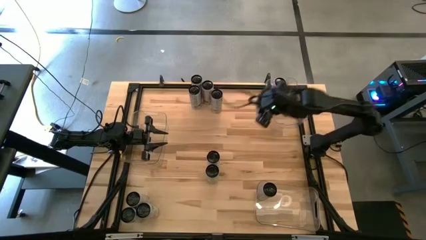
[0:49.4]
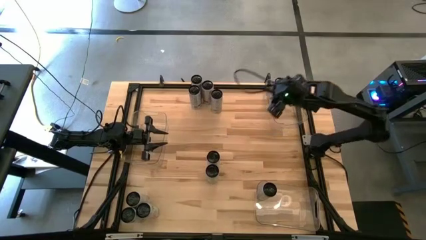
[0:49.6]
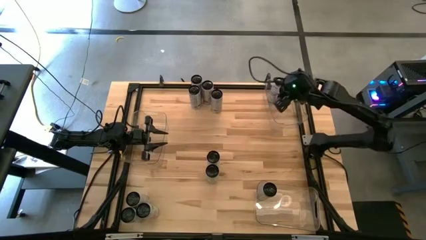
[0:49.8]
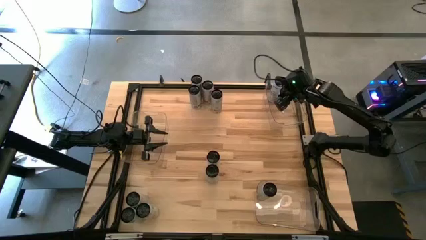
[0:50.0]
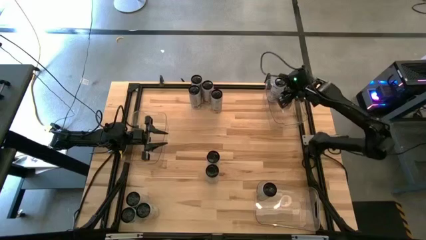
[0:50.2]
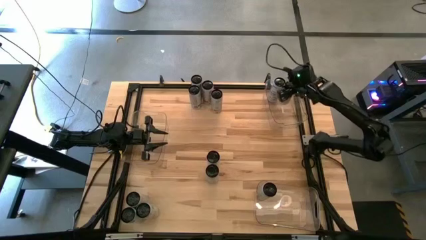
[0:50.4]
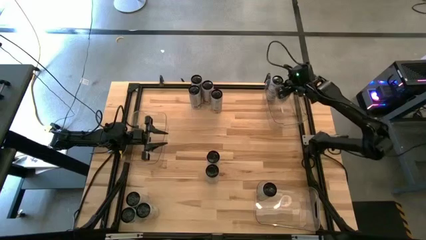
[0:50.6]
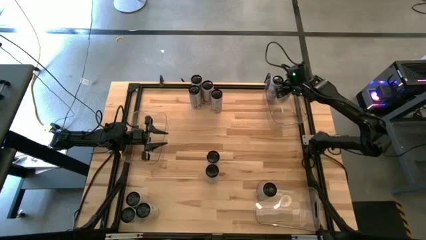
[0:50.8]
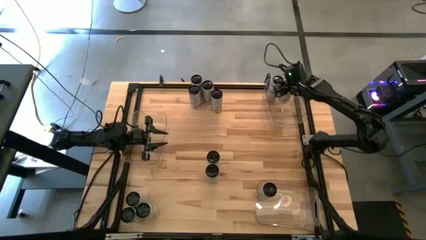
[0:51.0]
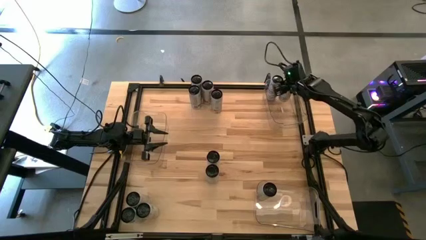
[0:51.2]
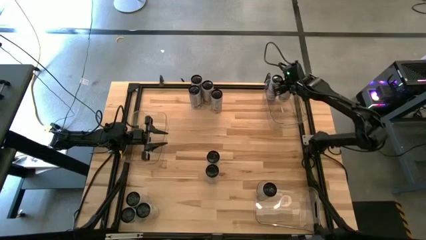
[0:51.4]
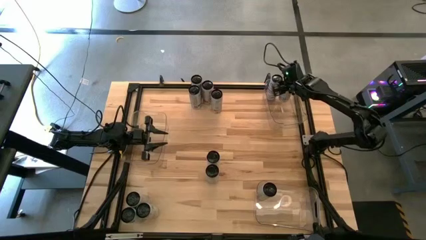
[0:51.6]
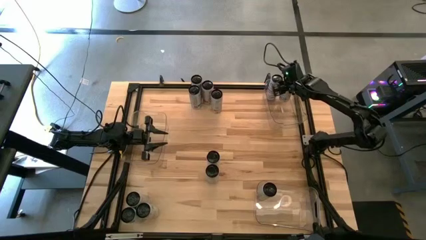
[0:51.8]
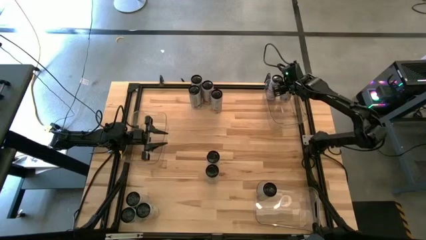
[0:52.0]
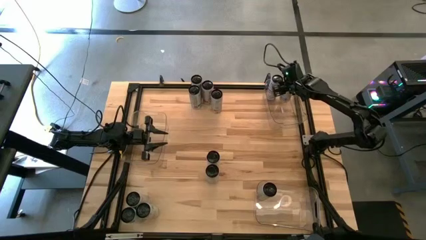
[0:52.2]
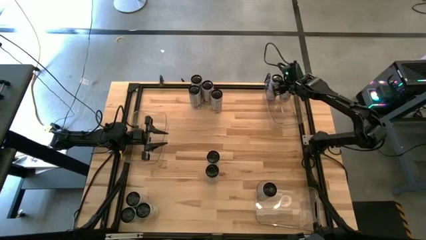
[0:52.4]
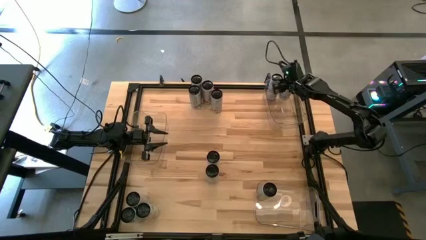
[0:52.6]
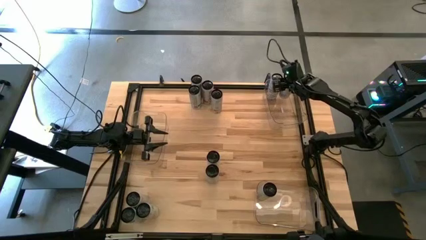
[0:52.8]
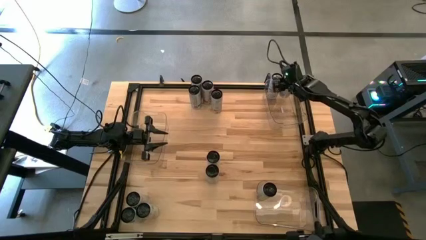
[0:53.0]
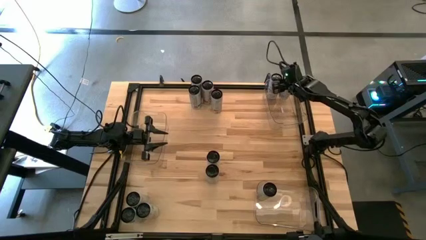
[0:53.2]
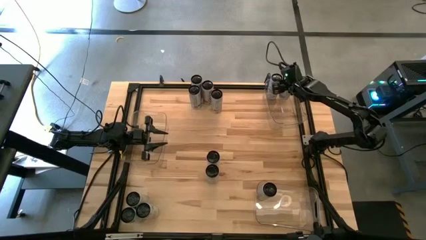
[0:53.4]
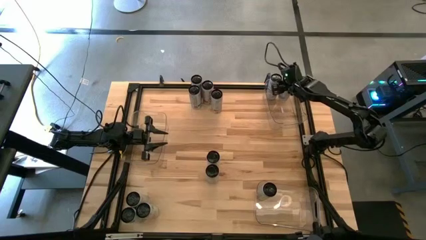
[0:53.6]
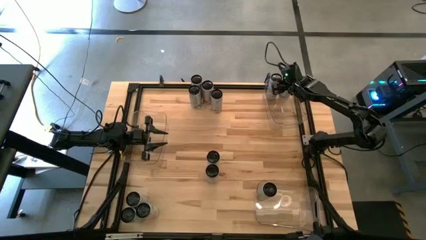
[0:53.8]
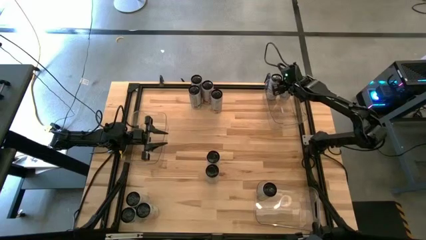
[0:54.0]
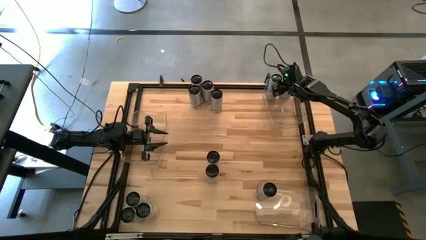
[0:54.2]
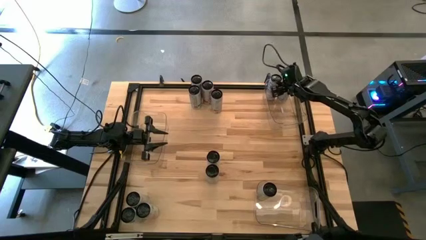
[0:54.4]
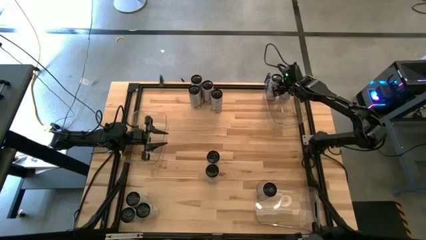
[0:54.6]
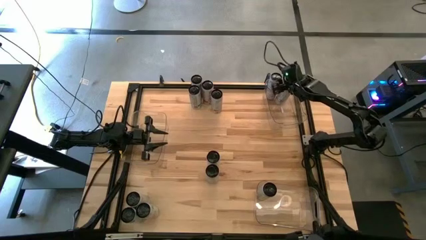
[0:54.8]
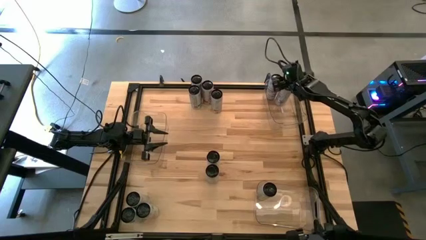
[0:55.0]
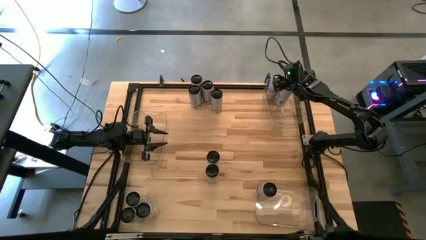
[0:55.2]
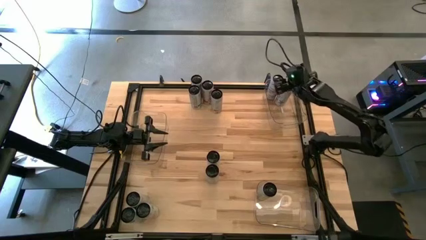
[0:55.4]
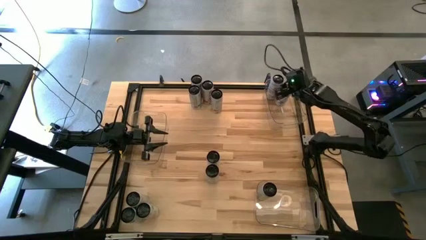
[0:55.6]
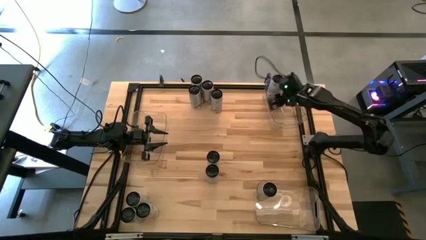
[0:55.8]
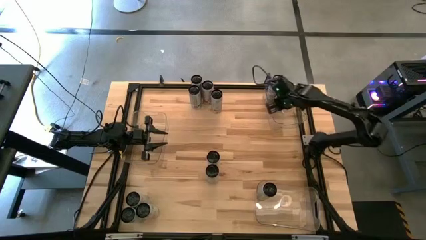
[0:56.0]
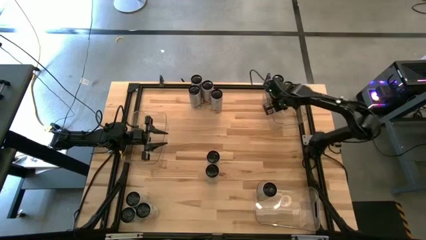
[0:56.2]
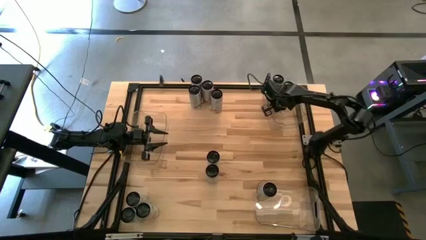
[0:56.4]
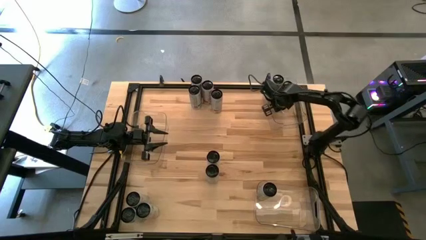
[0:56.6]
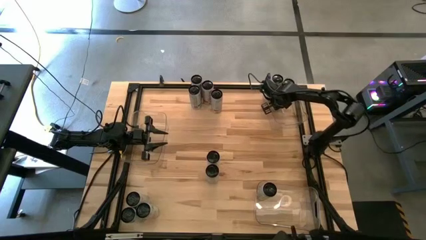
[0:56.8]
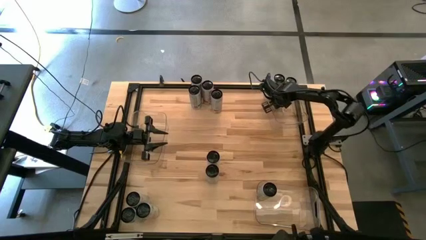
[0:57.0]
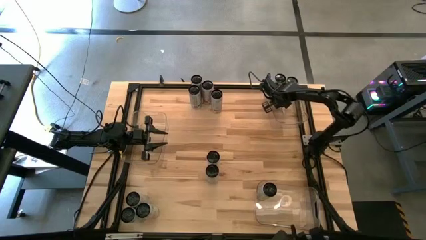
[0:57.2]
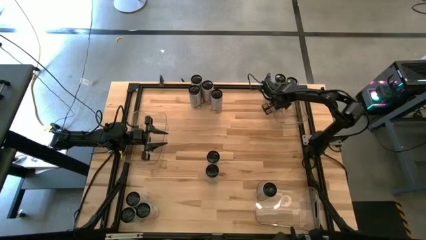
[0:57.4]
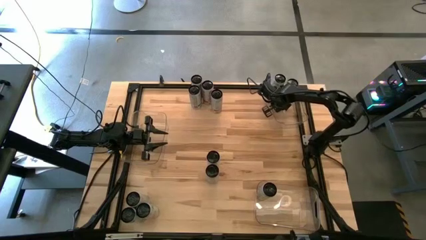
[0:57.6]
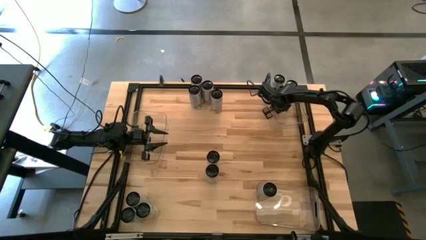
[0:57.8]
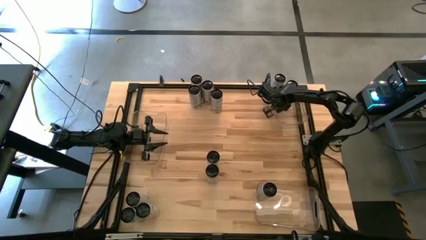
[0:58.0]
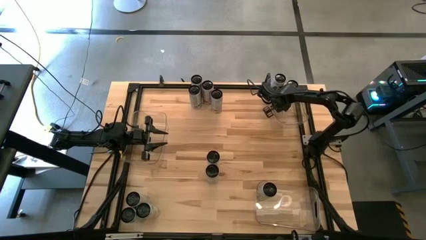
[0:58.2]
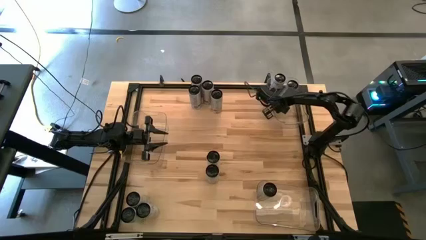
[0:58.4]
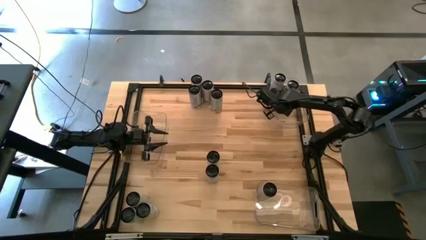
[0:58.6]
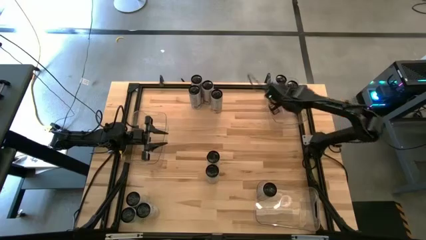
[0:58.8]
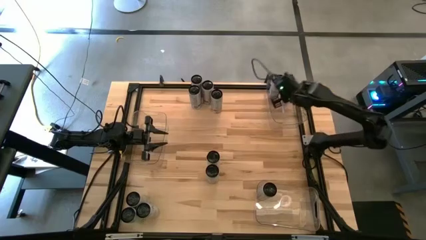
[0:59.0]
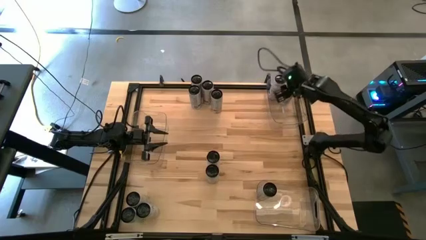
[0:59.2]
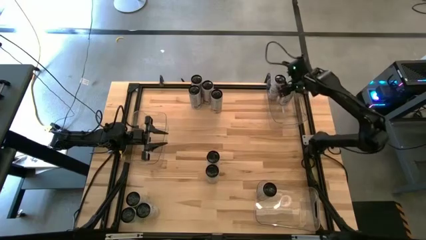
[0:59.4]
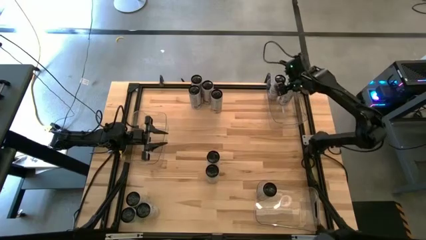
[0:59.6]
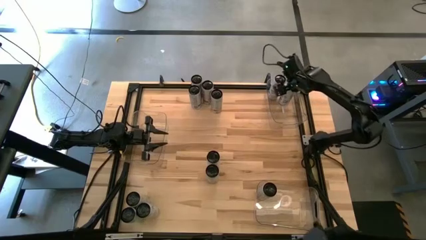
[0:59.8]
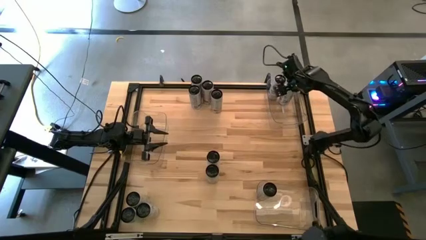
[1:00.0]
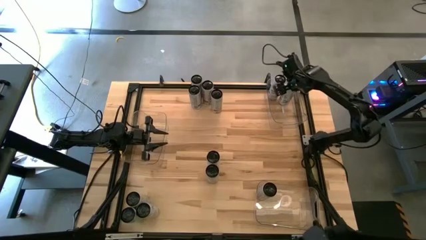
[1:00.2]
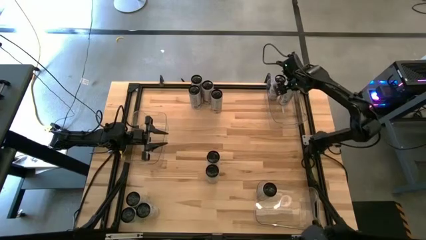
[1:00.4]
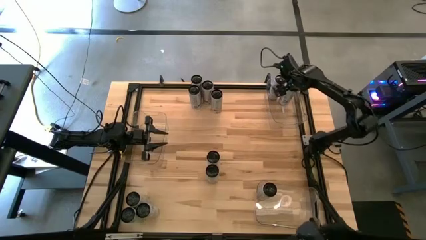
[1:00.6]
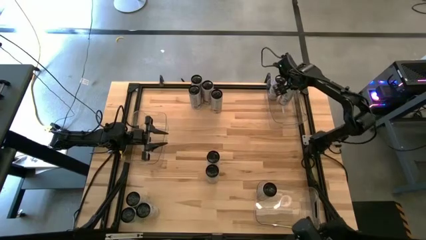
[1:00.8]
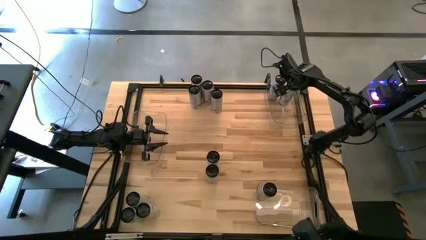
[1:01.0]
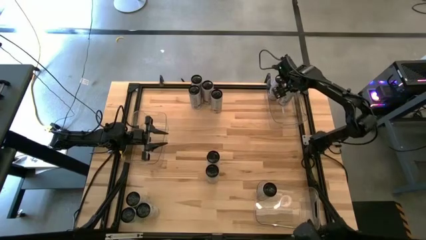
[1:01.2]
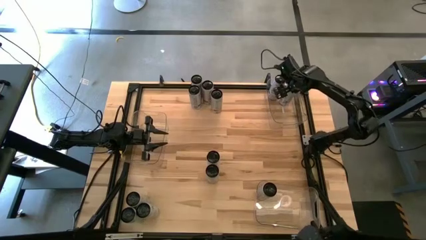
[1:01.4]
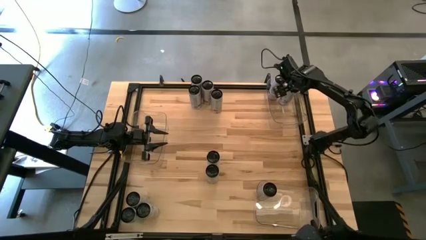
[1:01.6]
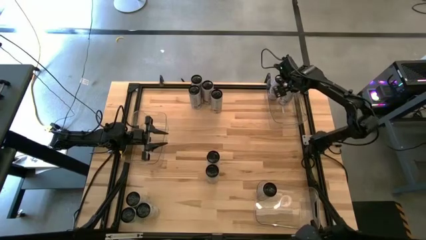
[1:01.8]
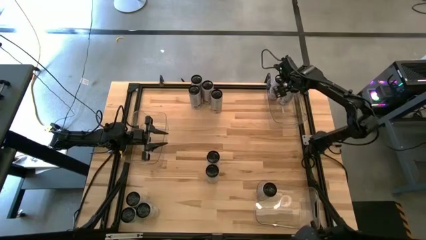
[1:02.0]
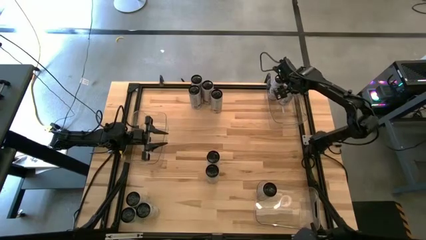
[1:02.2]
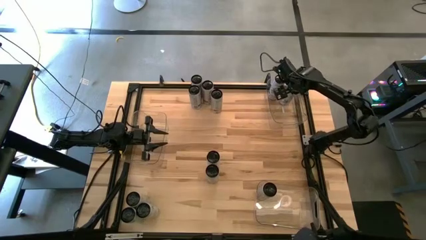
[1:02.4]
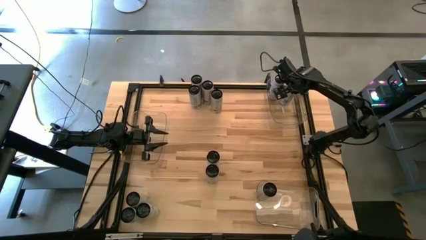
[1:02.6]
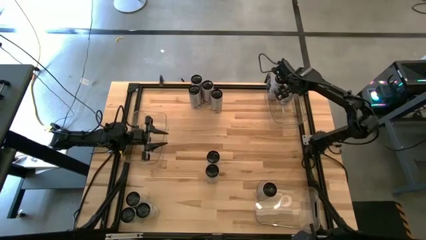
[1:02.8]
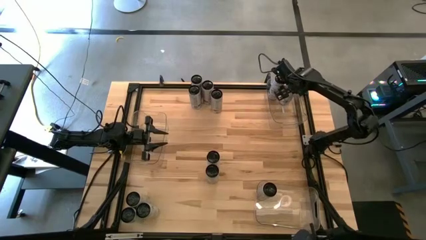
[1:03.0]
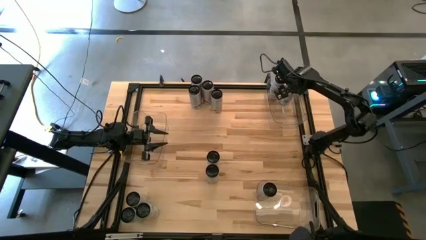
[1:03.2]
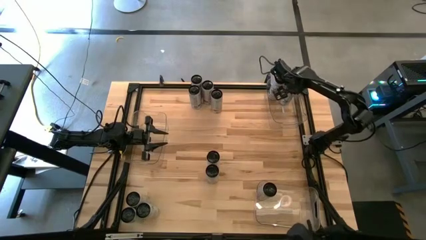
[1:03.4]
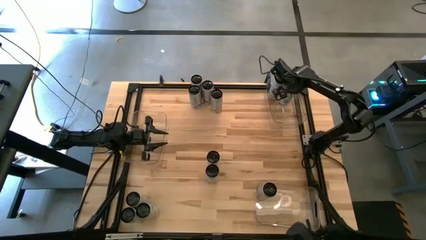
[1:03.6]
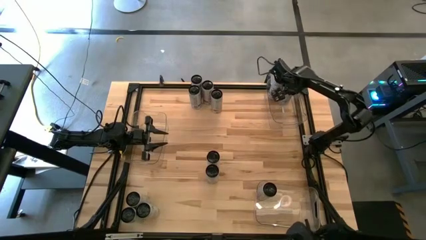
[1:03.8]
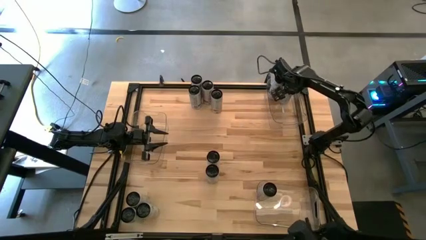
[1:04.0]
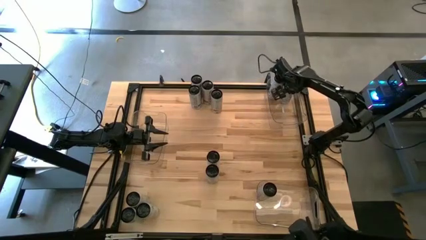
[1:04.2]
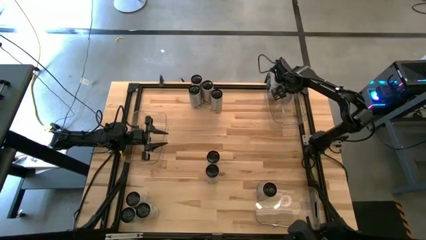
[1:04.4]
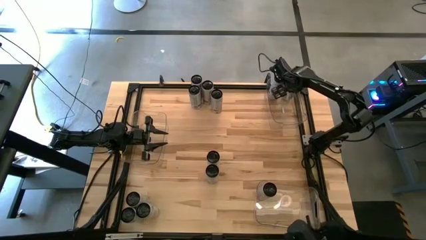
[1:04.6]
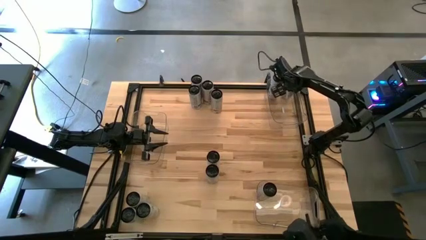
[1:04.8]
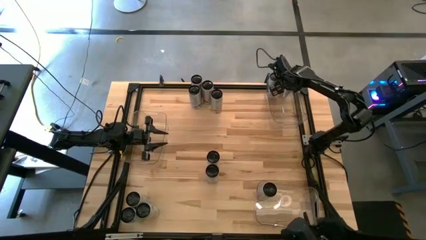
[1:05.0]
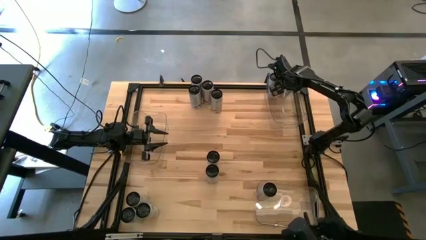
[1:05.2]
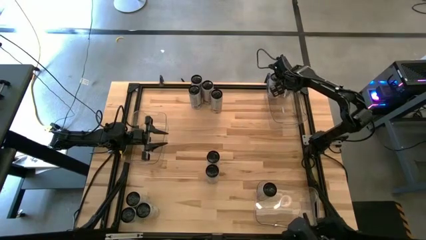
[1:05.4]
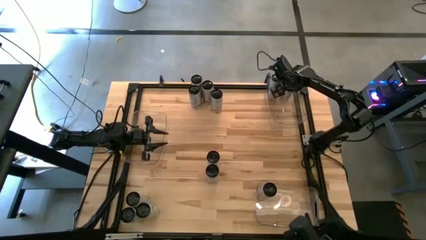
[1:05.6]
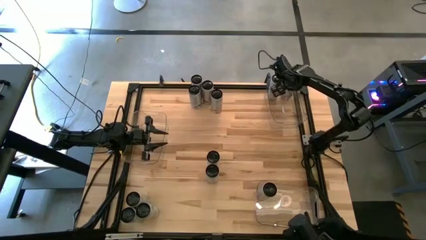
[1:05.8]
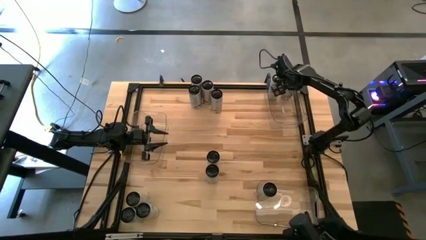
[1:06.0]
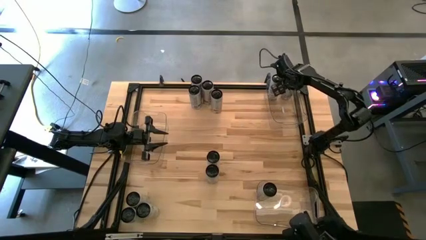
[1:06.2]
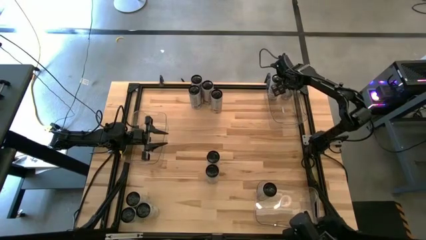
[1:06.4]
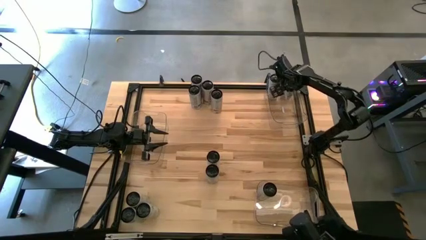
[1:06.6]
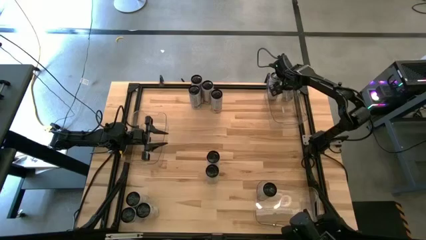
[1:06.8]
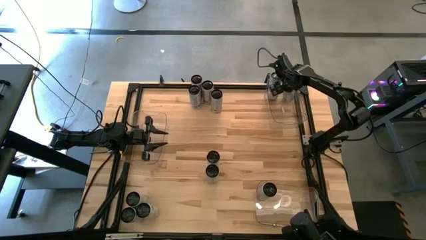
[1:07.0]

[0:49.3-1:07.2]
Task: Sort soda cans
Put the white-blue soda can into the top transparent bin
